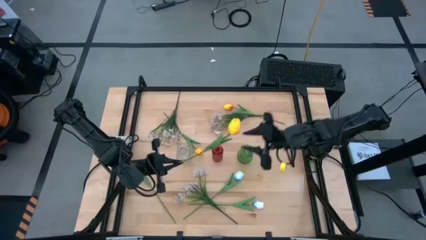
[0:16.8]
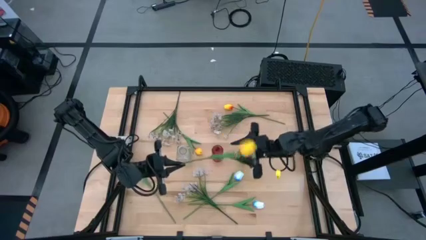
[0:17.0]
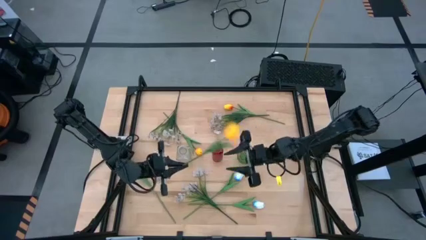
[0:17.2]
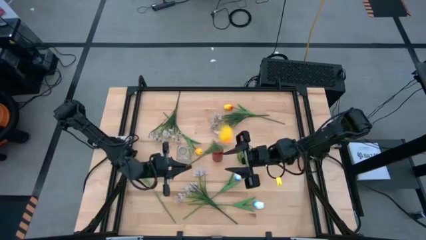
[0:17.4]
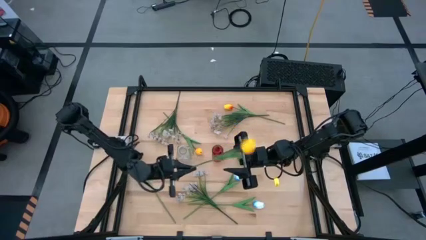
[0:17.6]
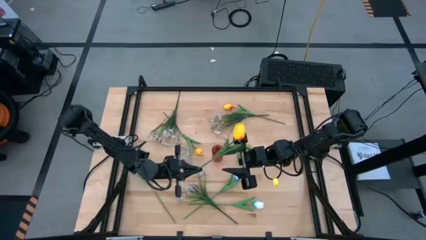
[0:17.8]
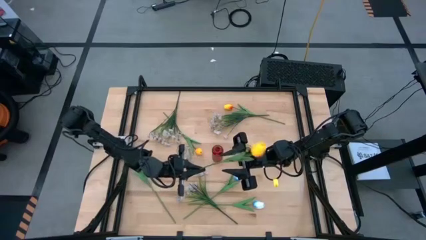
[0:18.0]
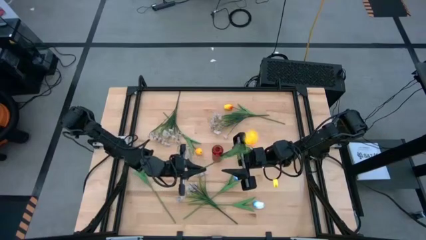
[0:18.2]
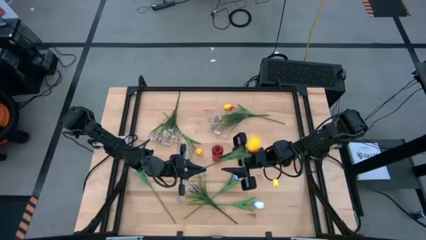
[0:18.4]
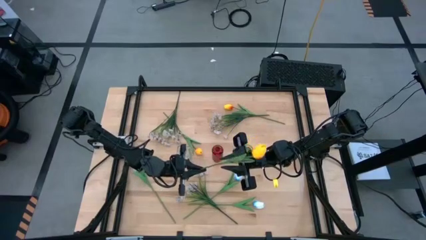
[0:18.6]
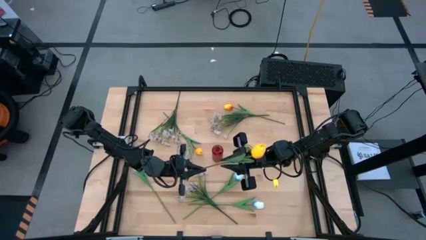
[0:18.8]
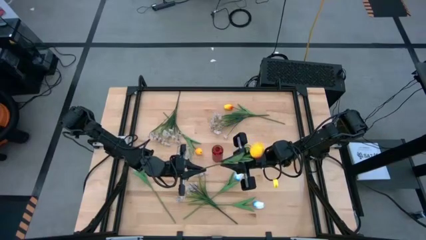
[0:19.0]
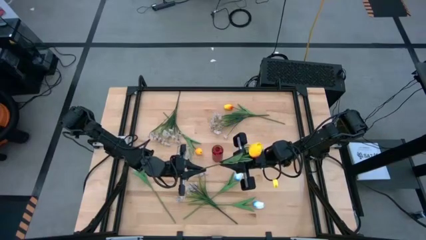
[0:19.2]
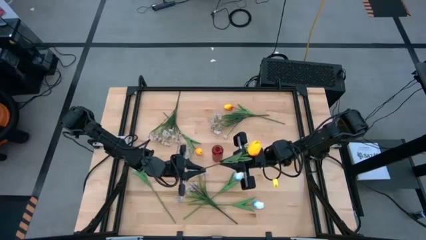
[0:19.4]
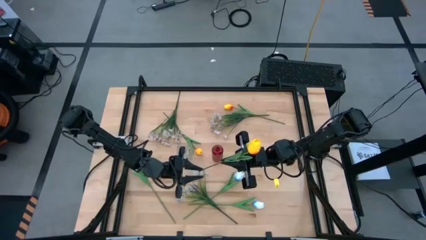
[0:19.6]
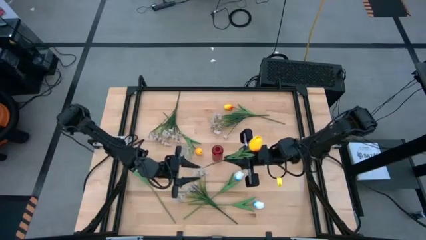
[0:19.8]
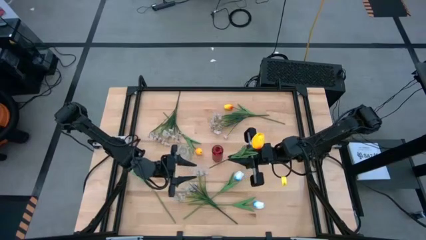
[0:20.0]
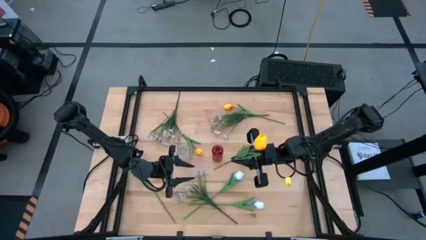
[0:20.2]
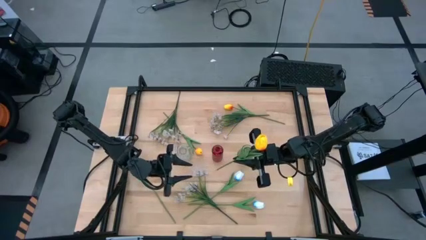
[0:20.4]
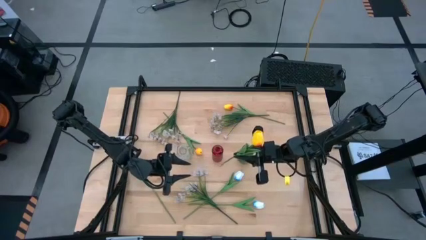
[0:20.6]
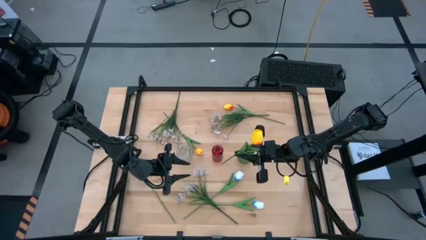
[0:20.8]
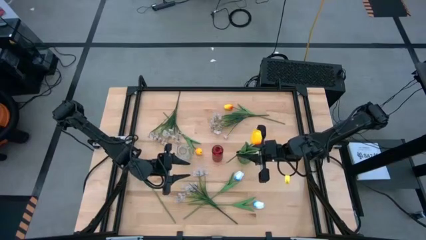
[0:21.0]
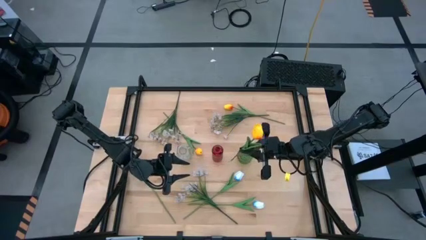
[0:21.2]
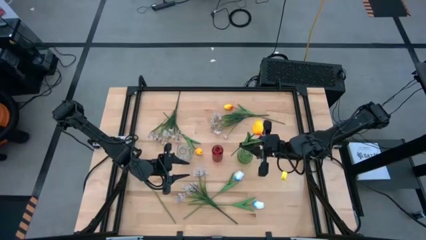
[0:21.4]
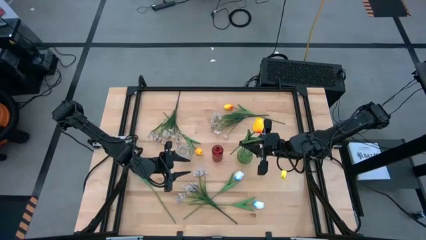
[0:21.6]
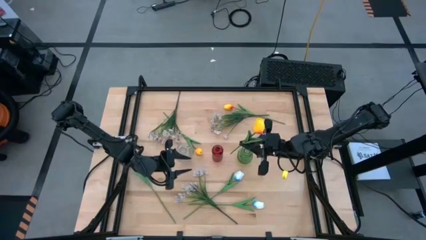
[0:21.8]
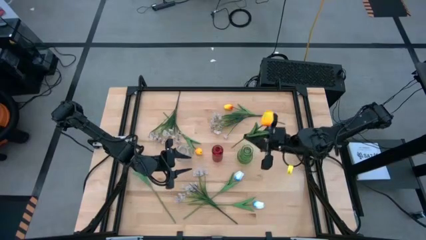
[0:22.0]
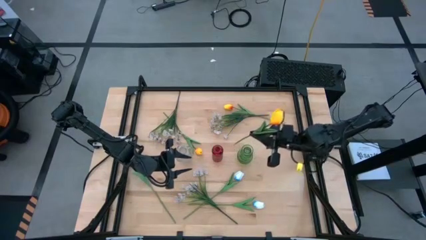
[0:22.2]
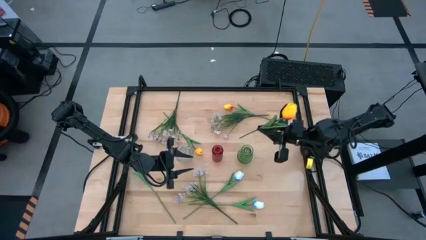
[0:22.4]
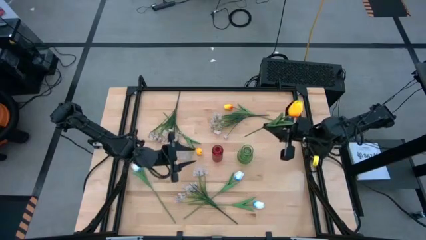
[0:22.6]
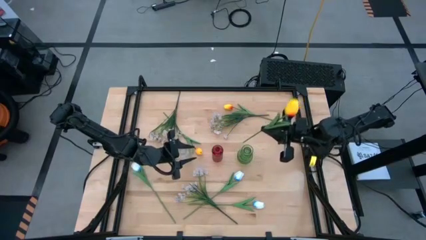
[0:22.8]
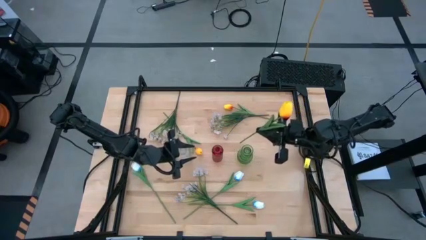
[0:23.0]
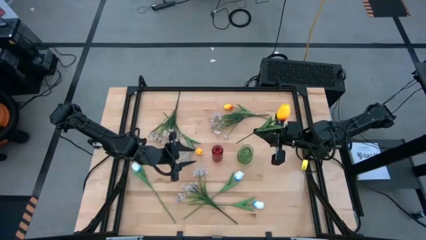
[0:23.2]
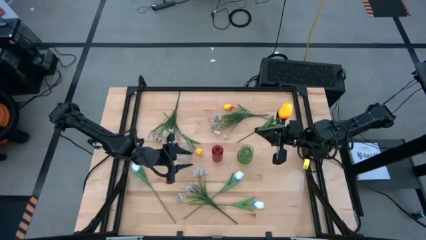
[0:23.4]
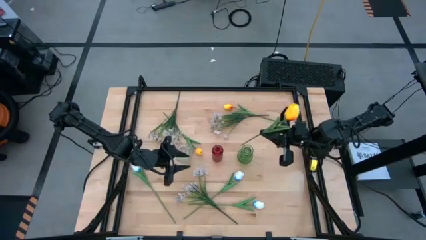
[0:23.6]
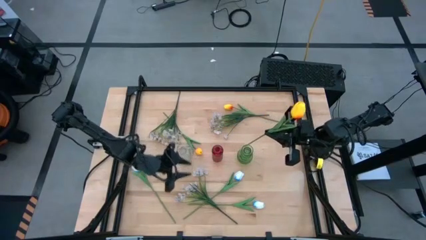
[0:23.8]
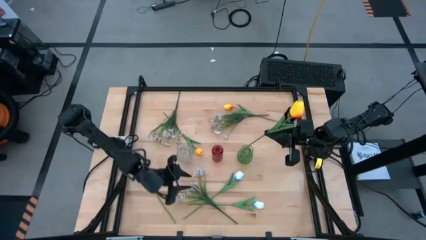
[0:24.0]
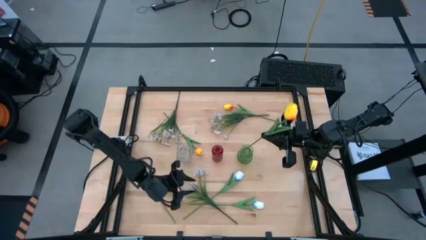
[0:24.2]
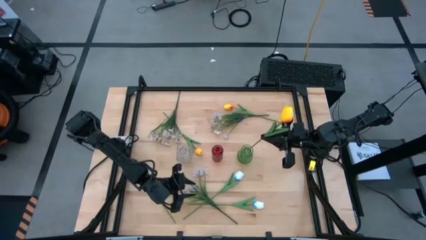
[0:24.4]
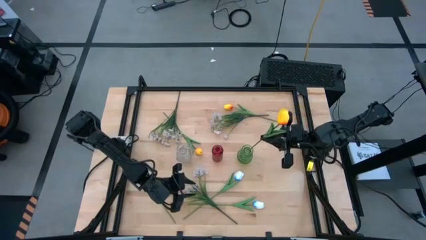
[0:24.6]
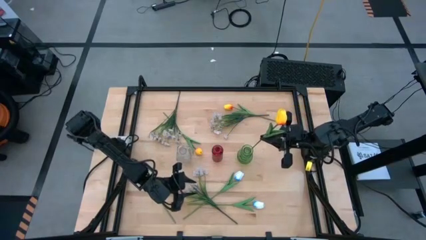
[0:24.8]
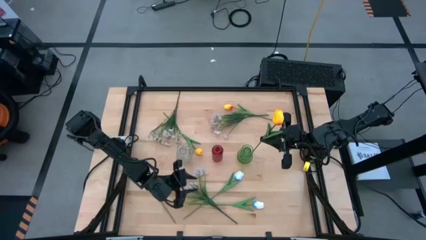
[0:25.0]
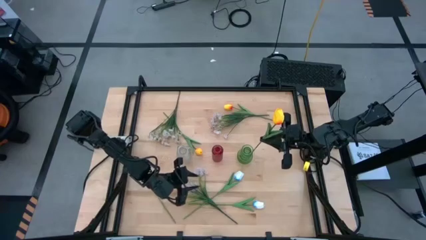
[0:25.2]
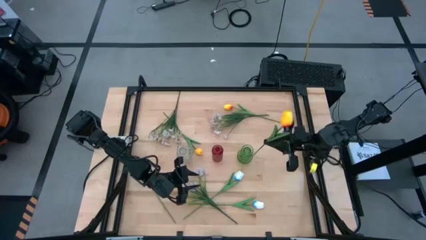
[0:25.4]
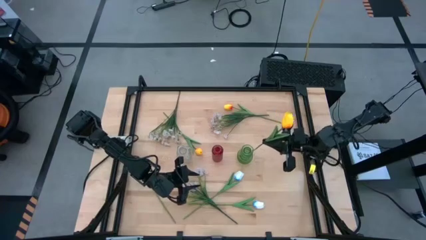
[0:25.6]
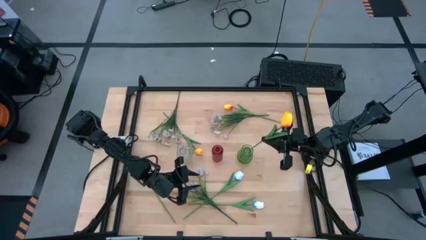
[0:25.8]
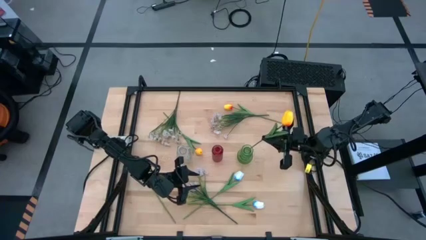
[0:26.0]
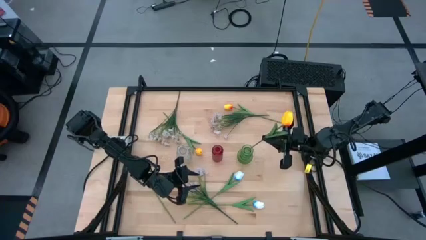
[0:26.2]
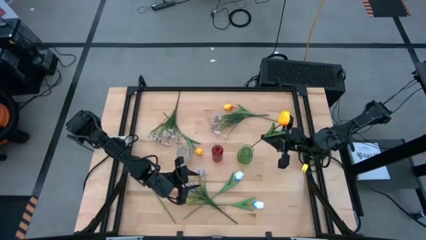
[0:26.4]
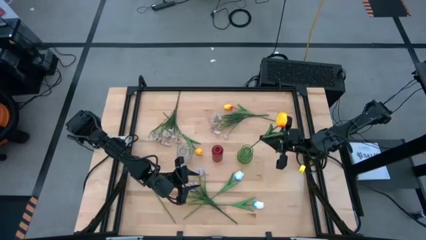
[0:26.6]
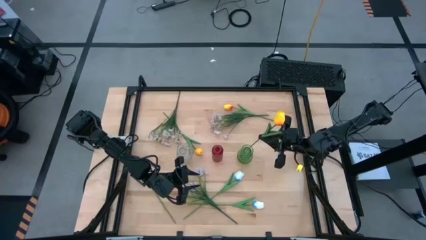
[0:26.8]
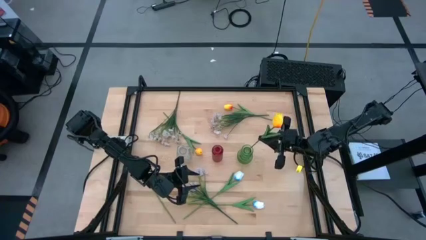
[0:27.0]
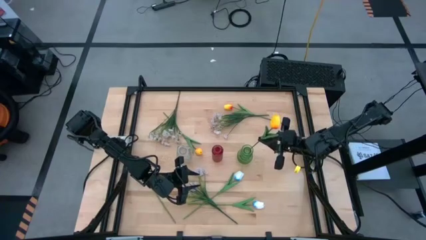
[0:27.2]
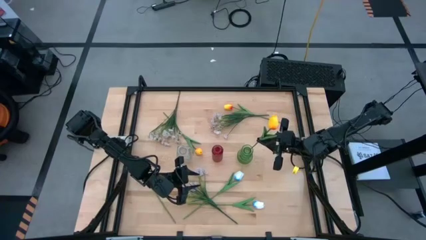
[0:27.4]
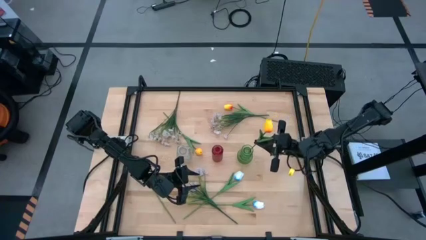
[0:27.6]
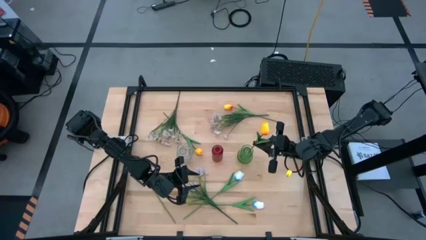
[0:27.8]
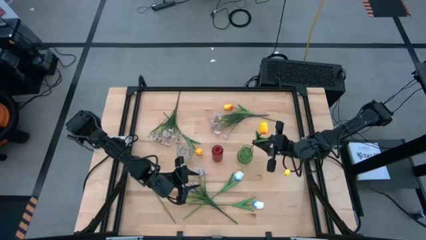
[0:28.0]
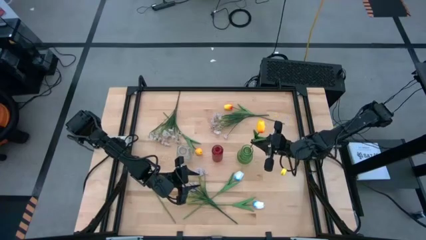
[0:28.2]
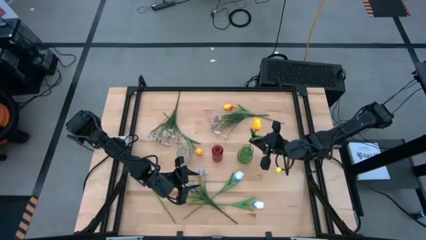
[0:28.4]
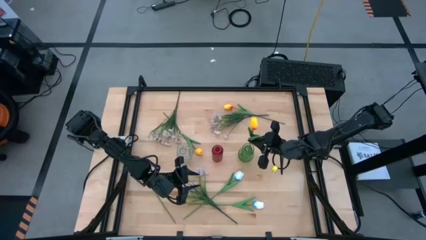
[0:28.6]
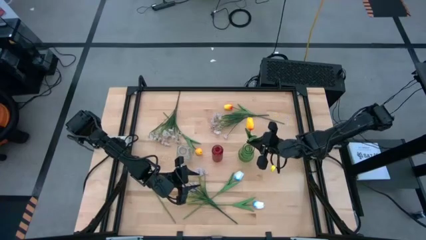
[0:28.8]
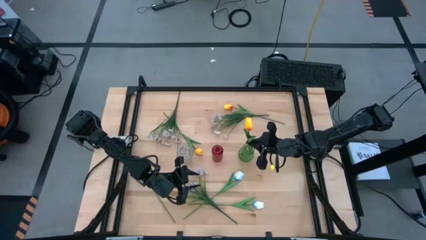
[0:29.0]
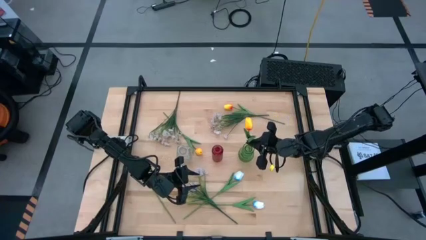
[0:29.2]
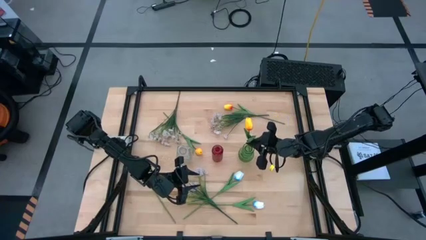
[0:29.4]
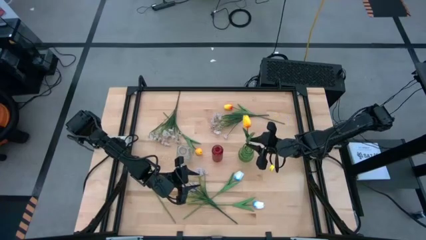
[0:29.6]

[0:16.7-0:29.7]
Task: Sort flowers into vase by color
Put the bottom right yellow tulip into the green vase

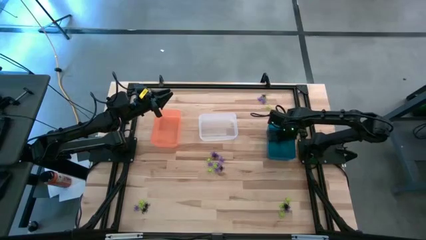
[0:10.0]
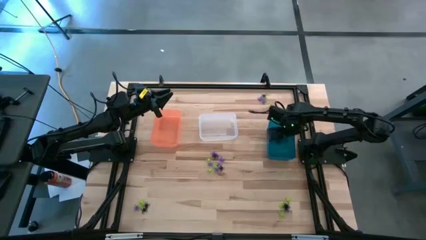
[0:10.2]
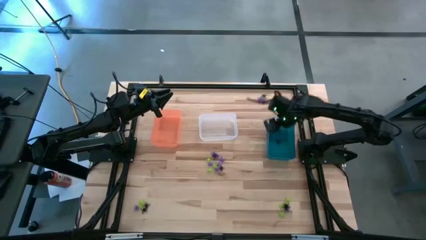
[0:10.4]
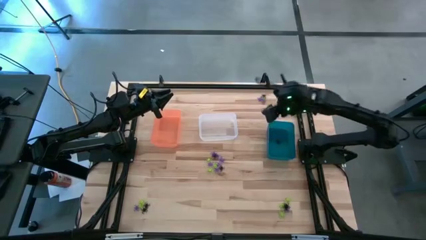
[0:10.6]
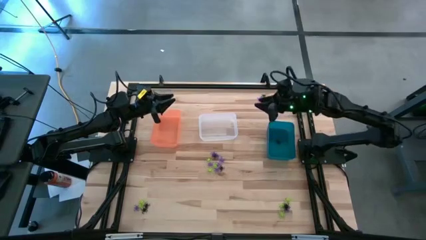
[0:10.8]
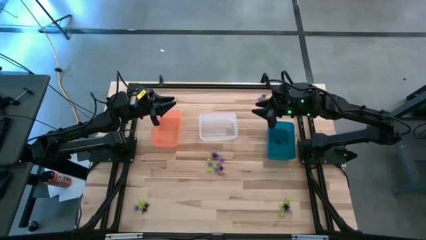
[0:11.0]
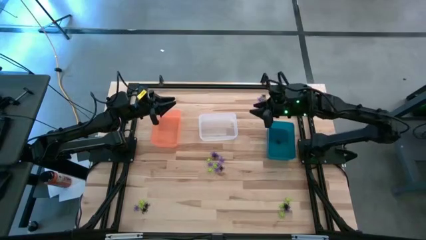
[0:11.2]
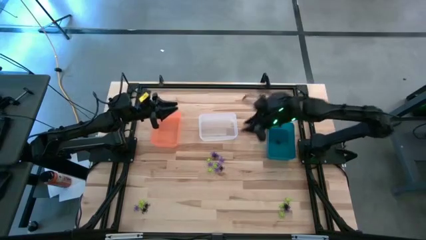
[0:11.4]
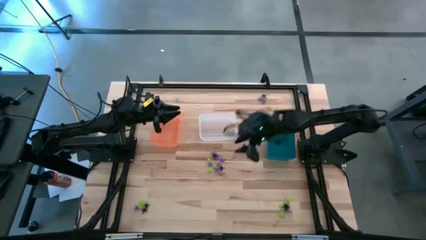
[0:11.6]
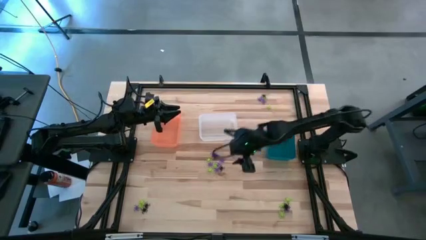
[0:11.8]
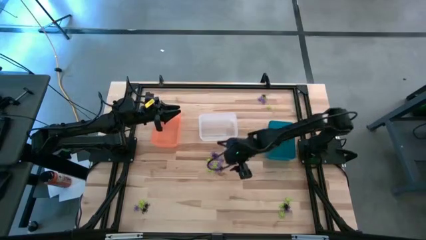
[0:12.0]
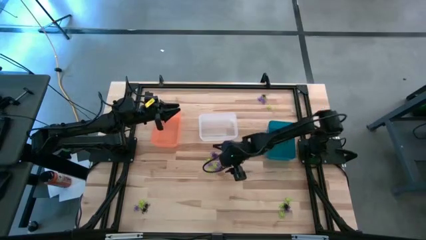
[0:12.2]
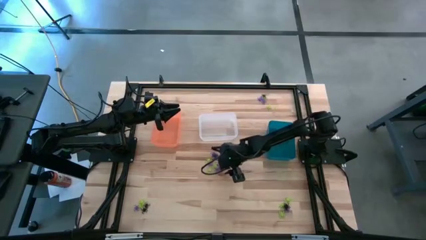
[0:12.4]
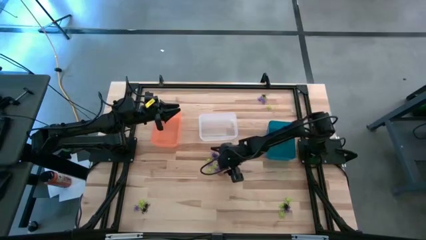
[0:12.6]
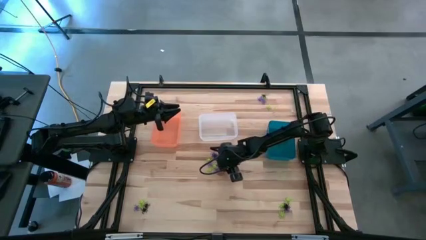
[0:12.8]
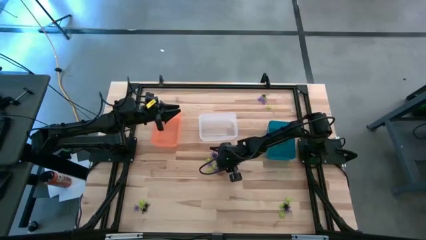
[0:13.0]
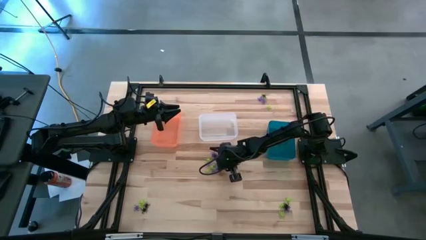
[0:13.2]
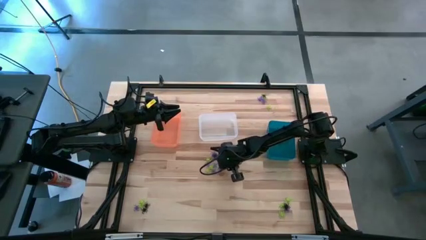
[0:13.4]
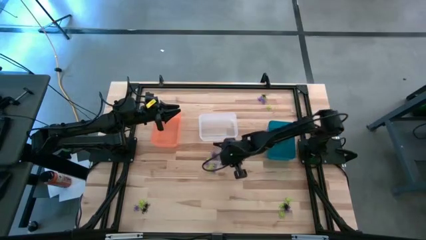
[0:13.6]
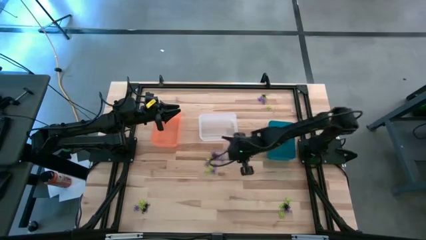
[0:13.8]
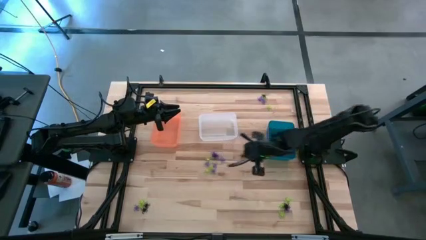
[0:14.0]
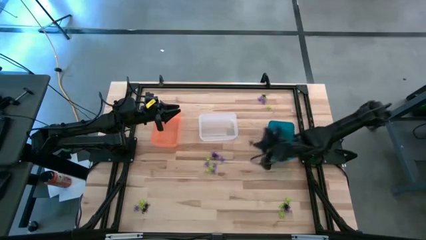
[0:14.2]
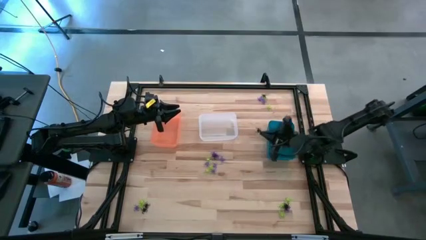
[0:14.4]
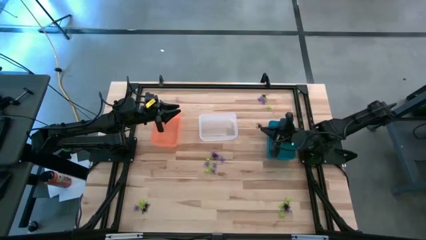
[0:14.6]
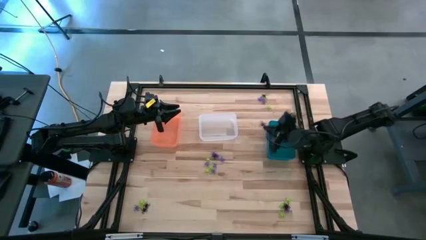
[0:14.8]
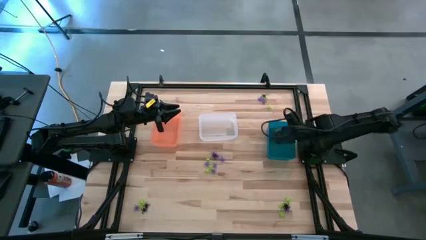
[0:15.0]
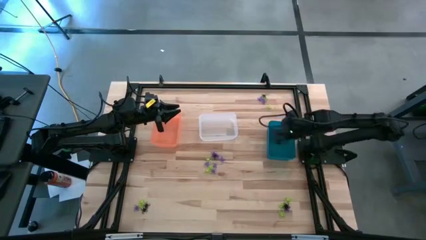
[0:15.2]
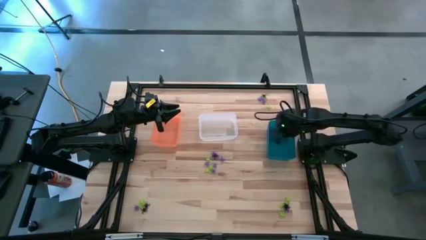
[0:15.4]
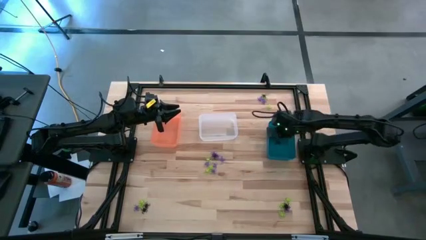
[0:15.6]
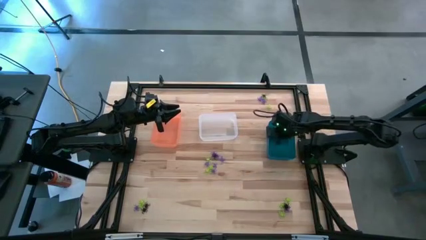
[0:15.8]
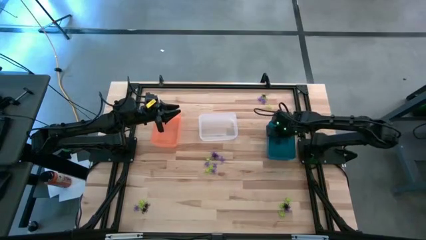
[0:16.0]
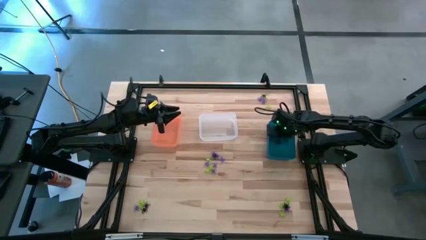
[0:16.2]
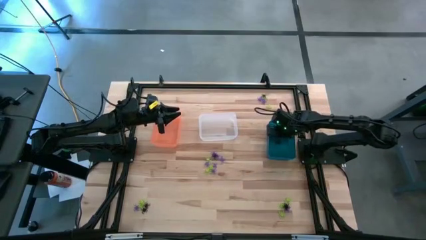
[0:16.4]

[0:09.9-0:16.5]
Task: Sort Halloween decoration
Put the black spider toy into the blue bin
